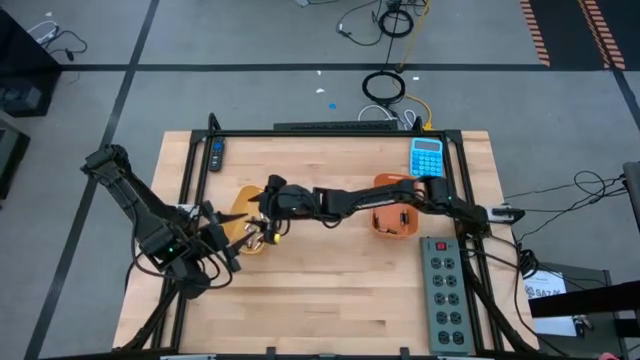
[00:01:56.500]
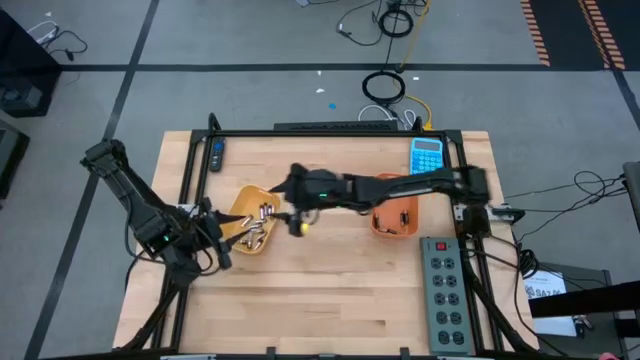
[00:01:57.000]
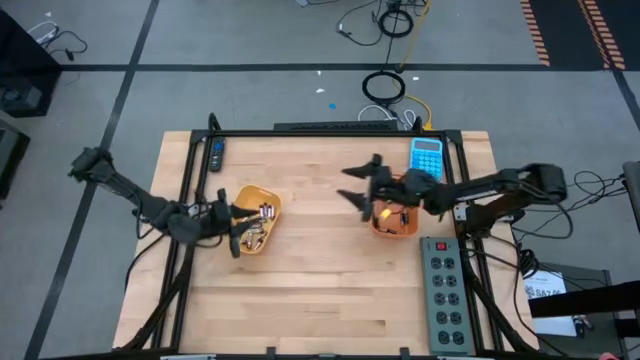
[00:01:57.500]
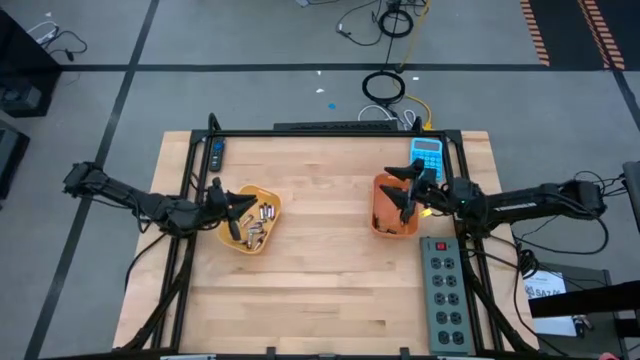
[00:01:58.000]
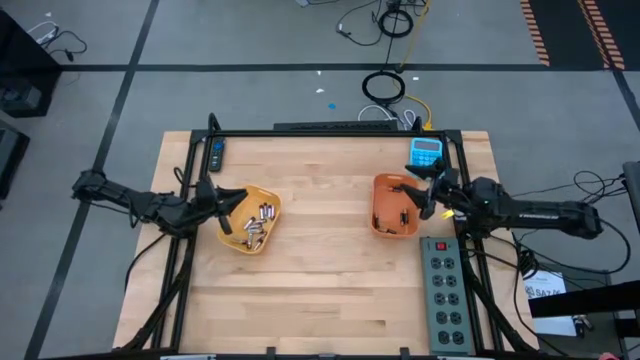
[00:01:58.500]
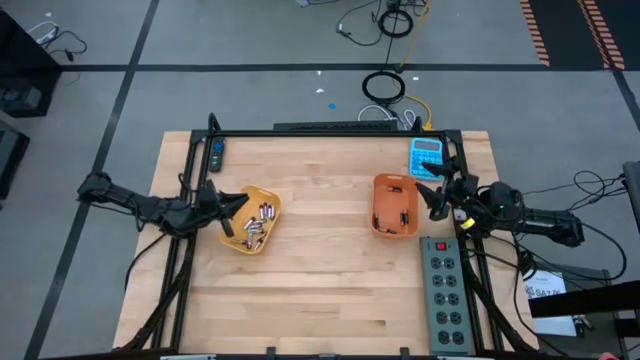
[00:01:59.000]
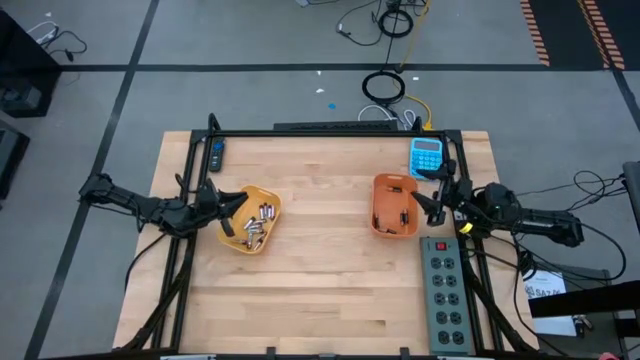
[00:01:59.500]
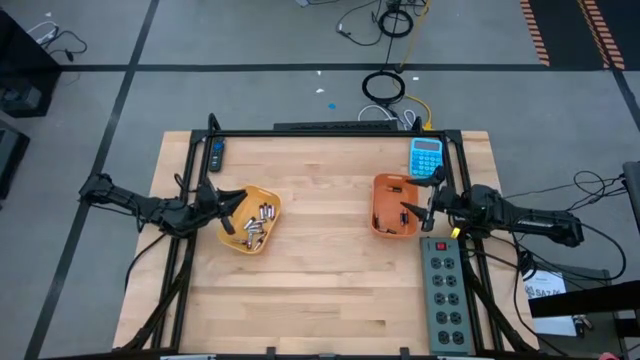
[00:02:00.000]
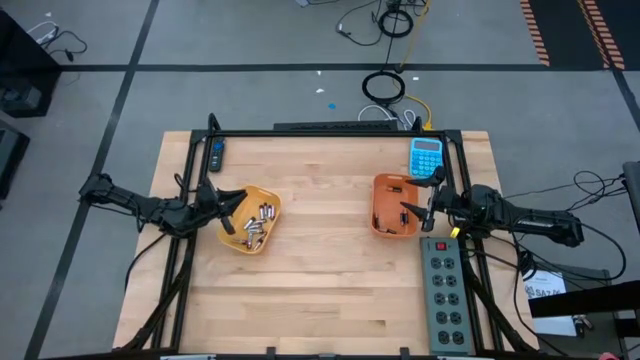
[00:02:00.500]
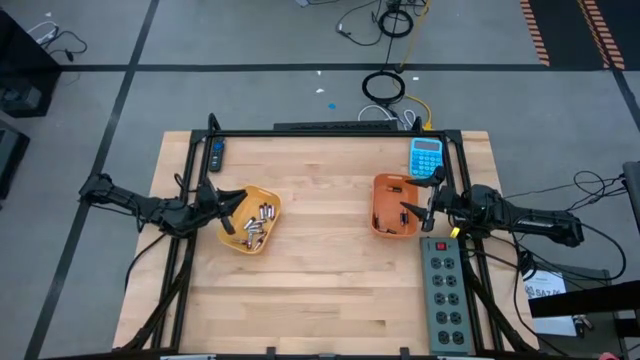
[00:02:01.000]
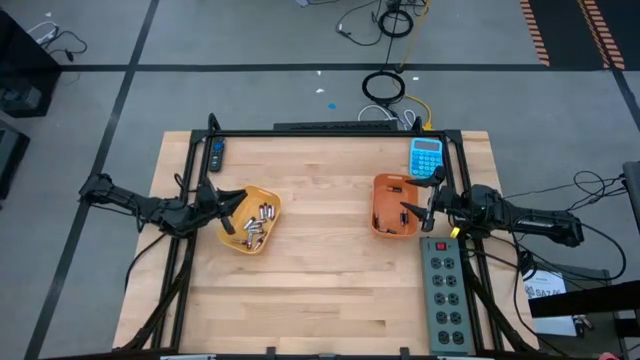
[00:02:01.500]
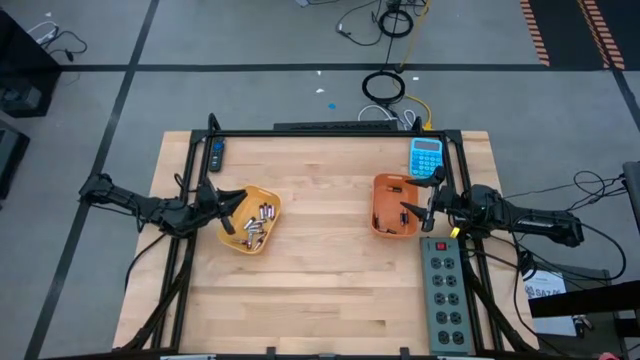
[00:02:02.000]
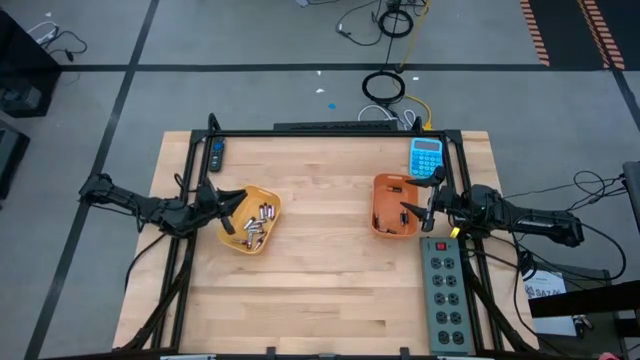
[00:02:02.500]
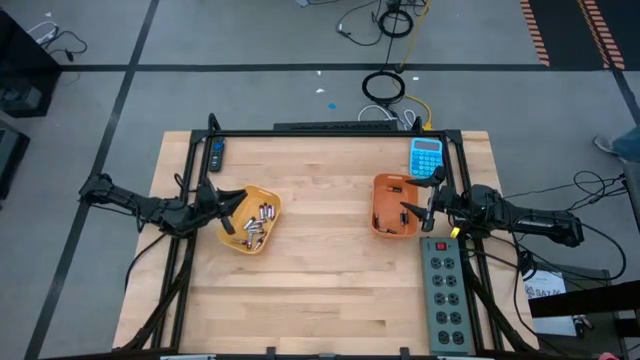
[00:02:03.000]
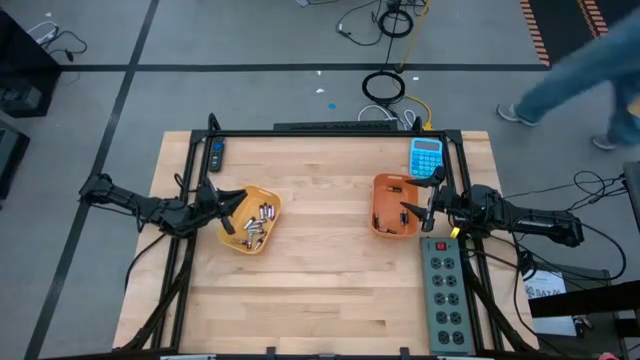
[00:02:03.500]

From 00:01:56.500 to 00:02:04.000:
Task: Sort batteries
Return to Home Position

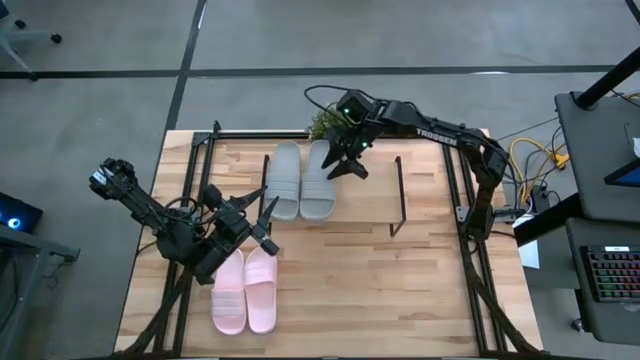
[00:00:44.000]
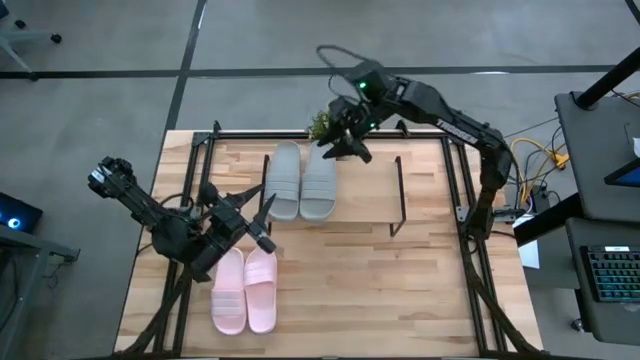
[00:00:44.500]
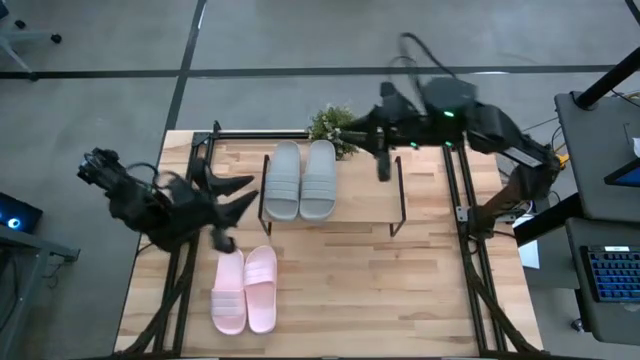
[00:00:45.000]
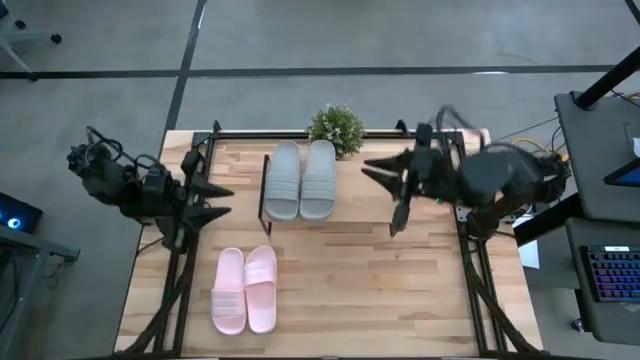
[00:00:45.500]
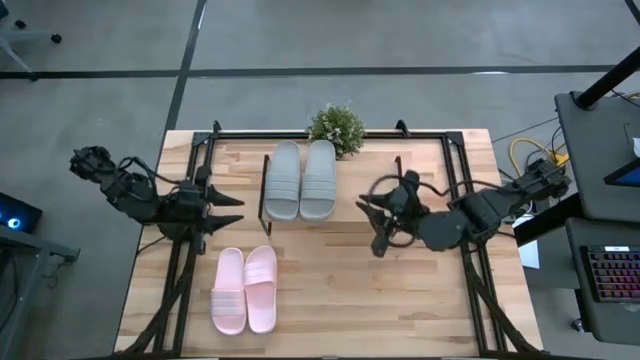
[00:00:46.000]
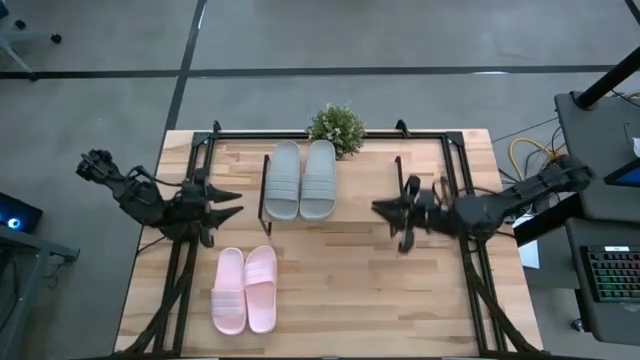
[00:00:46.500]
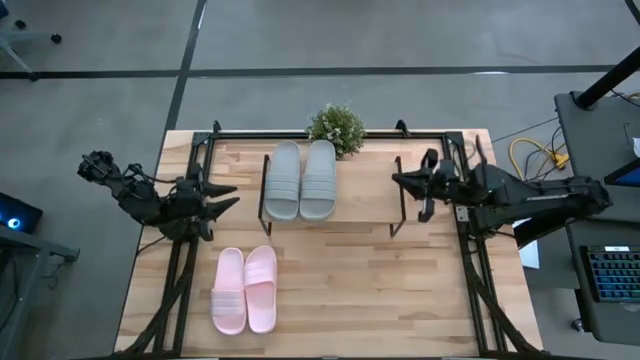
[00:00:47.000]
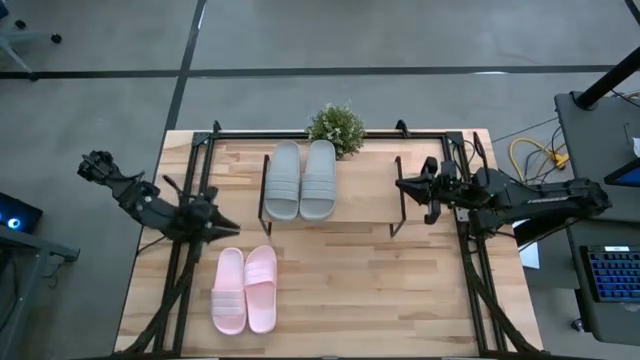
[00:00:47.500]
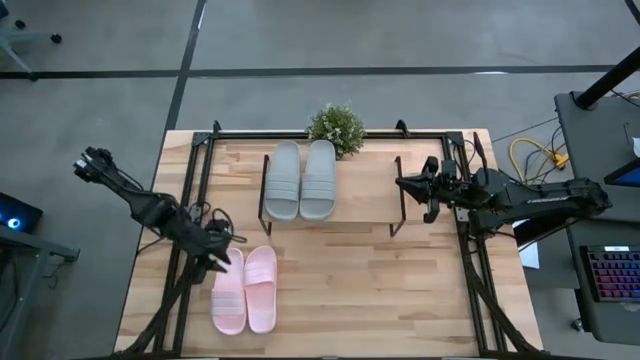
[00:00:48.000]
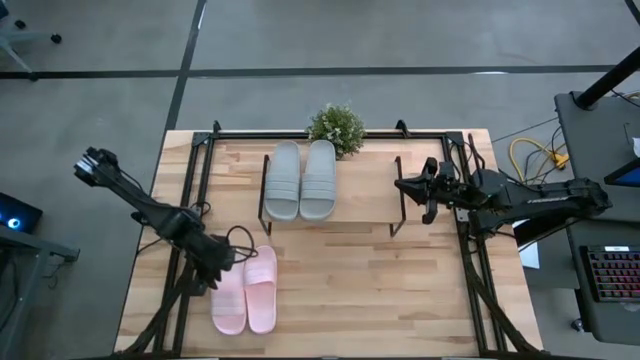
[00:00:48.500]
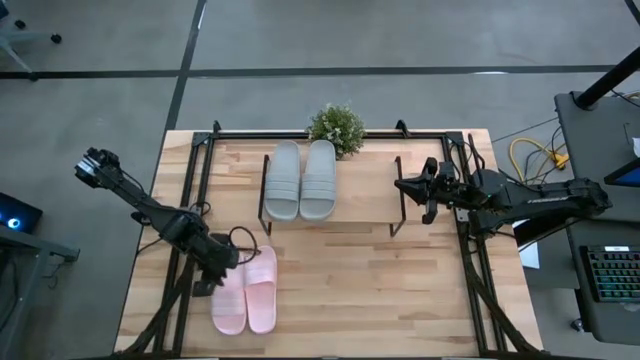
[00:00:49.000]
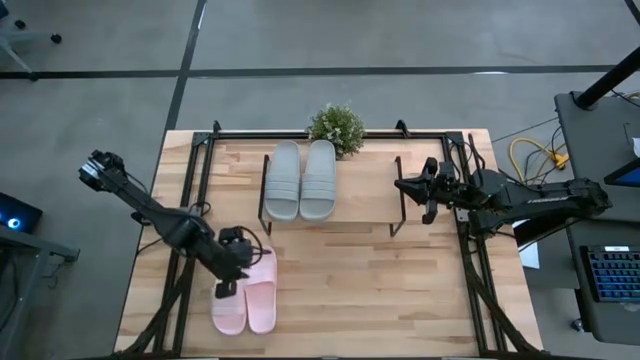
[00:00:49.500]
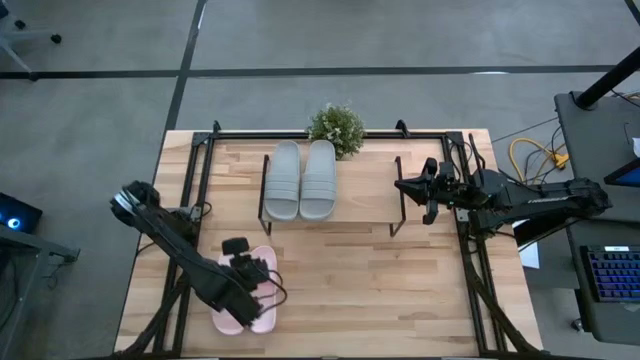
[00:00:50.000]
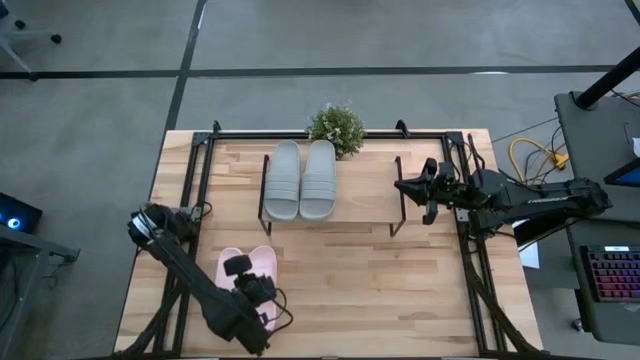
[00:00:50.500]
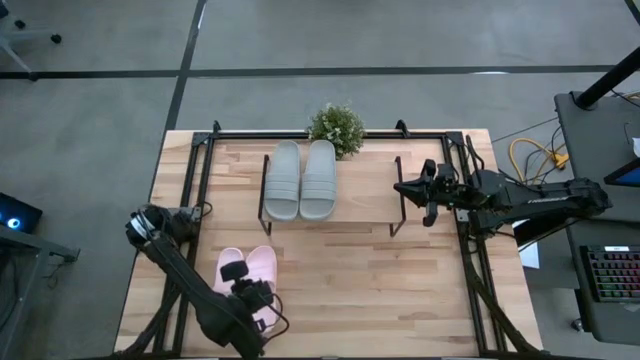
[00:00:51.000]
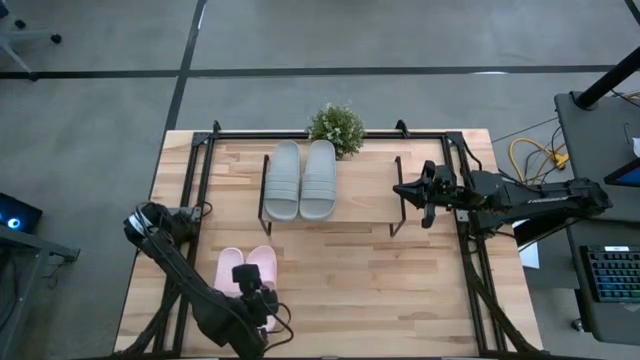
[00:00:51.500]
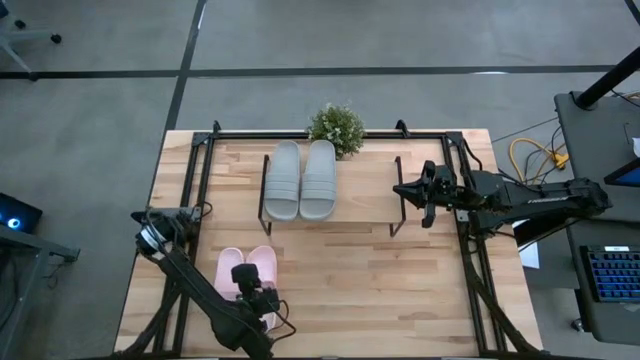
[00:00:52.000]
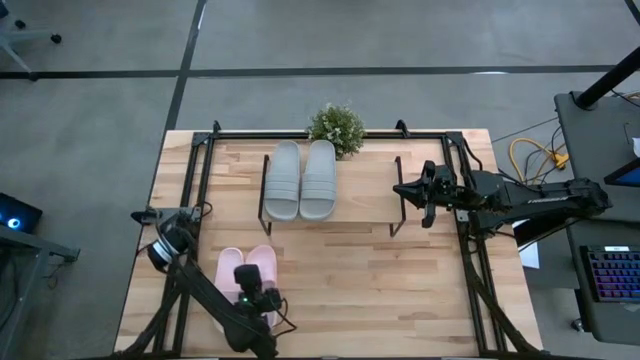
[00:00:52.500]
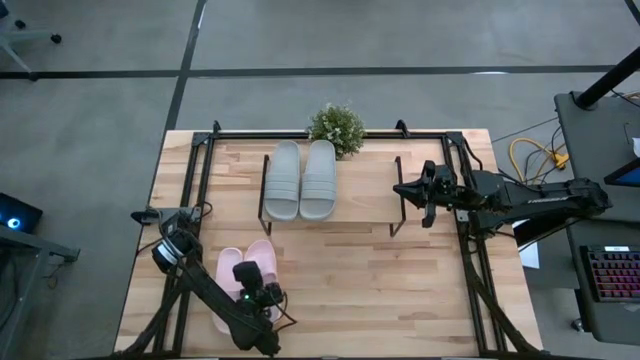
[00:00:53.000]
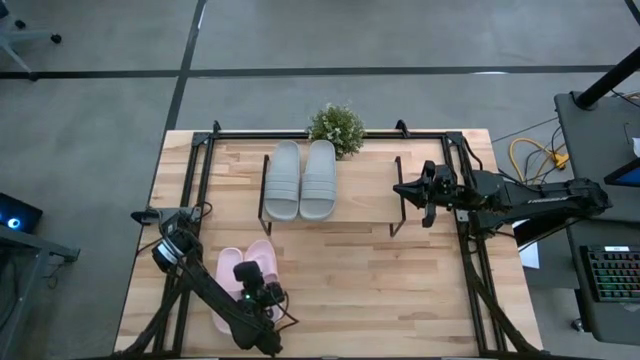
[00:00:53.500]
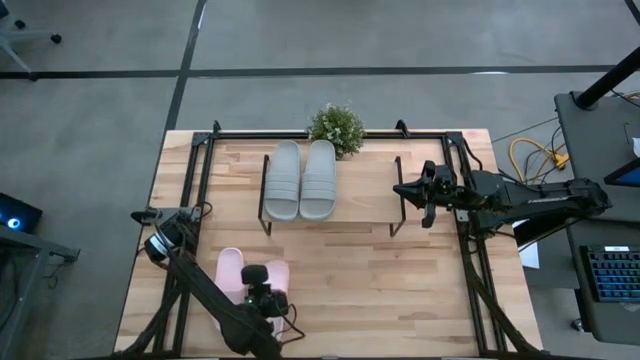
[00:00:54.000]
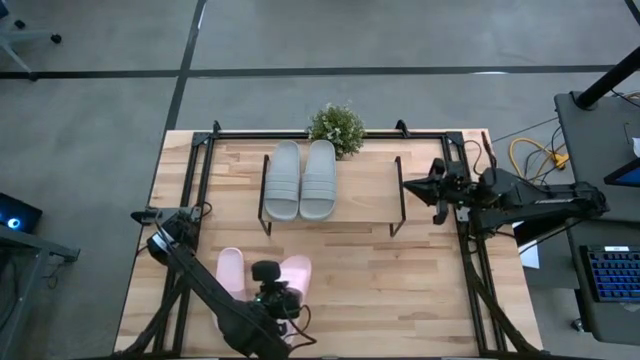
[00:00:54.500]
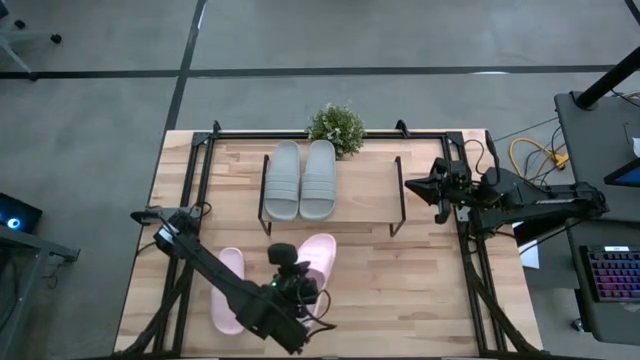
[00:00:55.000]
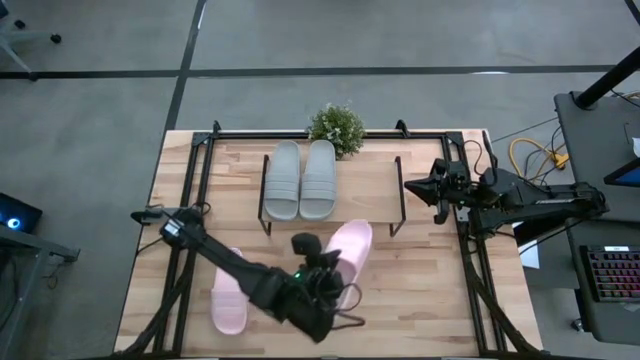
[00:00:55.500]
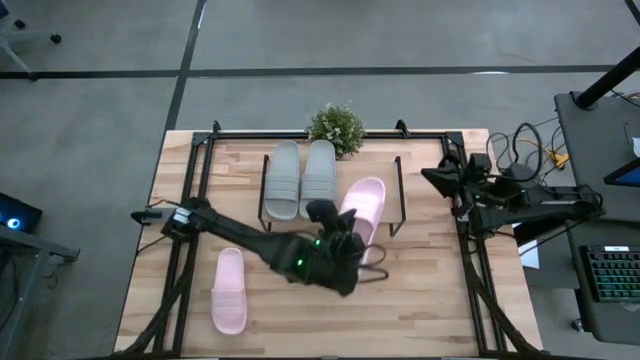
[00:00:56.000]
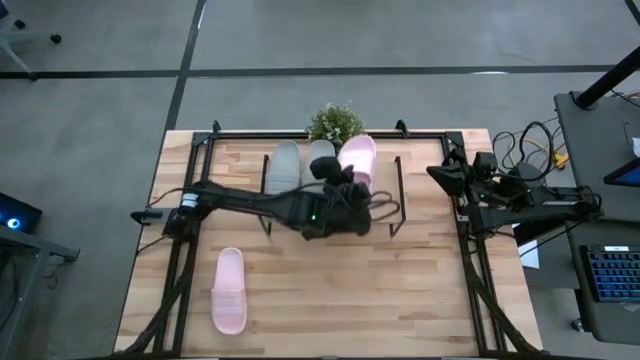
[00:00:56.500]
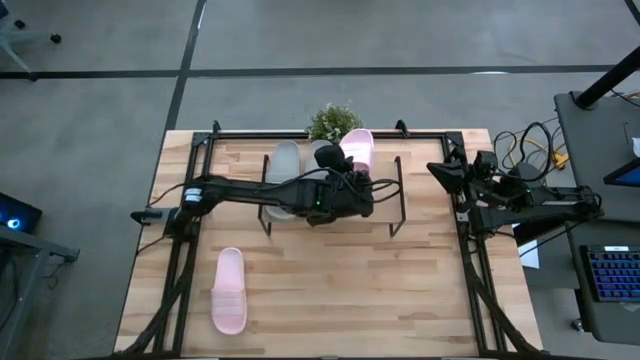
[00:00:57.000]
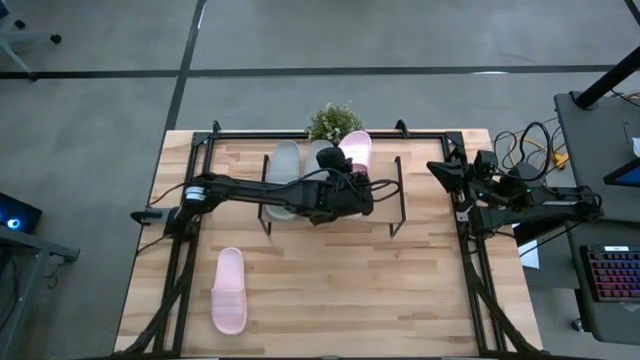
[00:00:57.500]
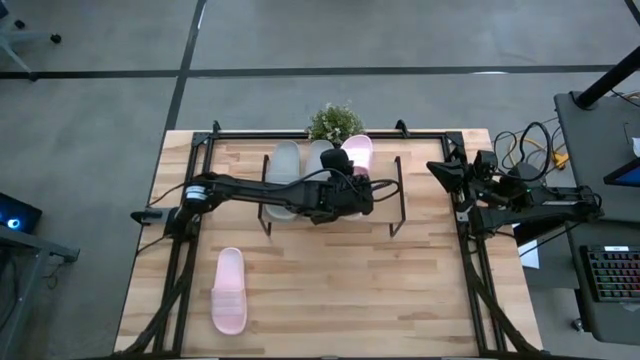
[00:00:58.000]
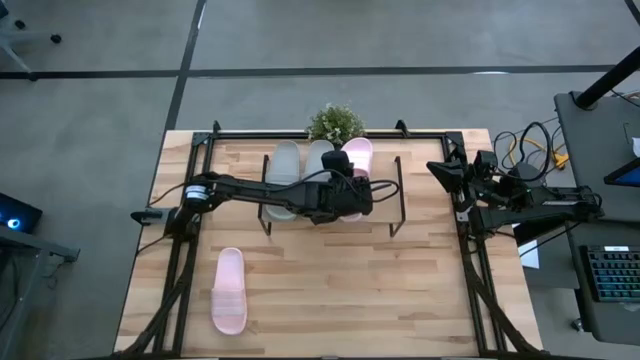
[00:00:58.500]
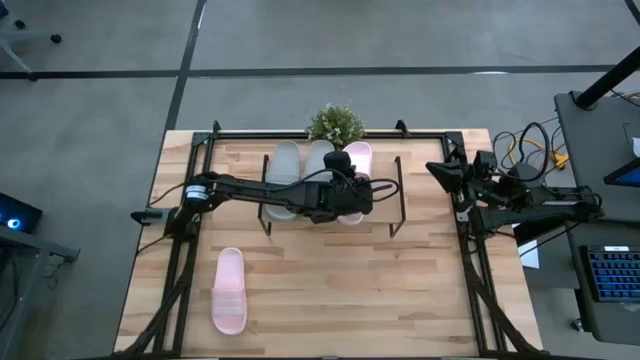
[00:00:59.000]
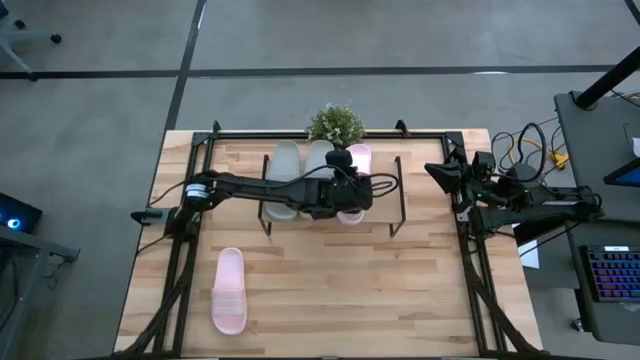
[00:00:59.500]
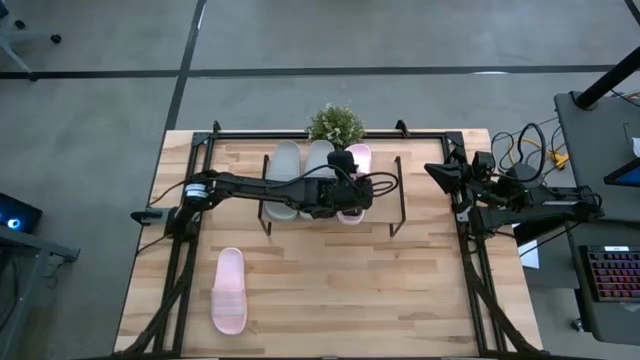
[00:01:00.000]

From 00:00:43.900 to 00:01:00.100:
Task: Pick and place slides into the shelf
Put the left pink slipper on the shelf
